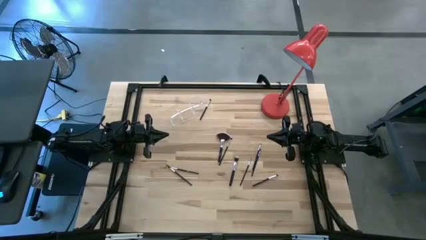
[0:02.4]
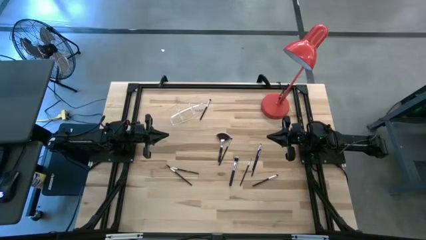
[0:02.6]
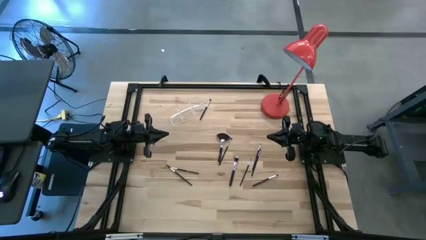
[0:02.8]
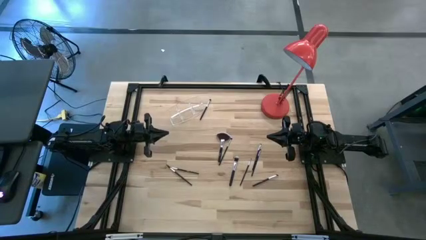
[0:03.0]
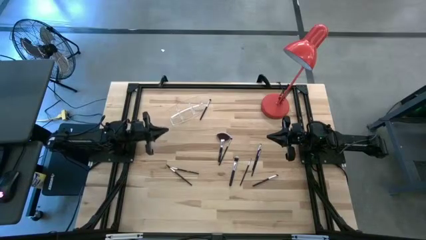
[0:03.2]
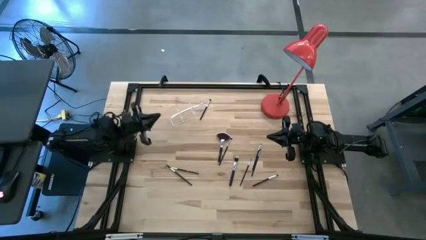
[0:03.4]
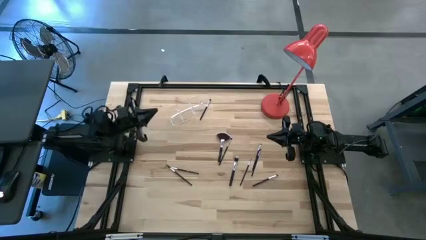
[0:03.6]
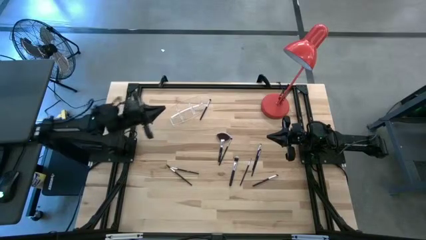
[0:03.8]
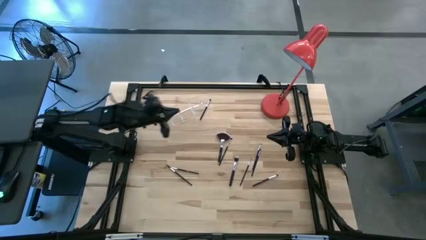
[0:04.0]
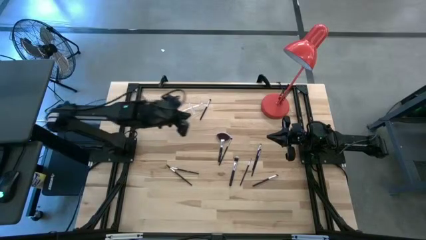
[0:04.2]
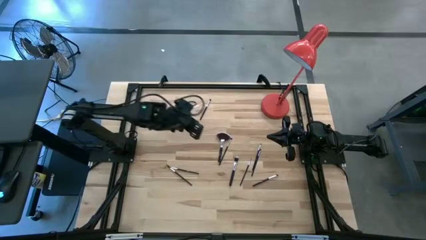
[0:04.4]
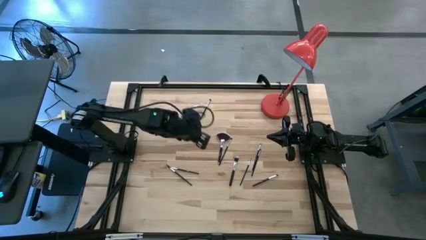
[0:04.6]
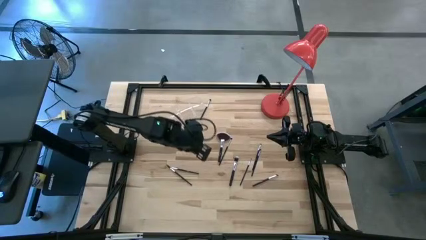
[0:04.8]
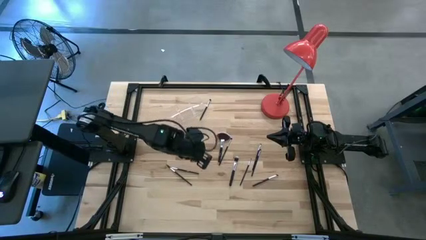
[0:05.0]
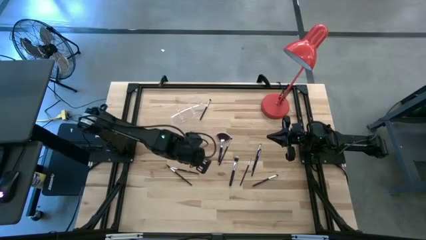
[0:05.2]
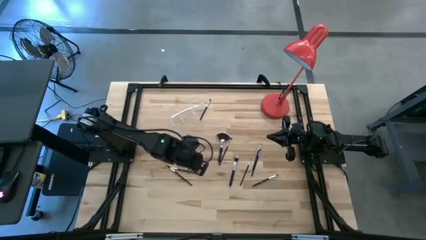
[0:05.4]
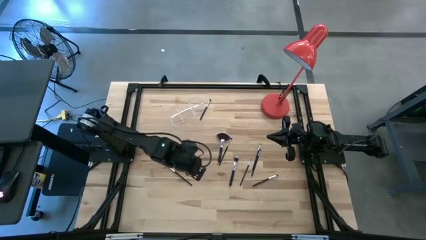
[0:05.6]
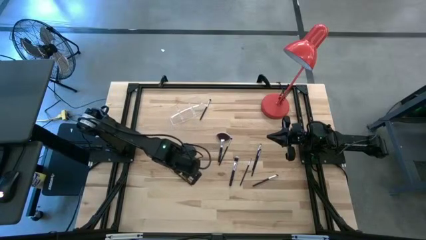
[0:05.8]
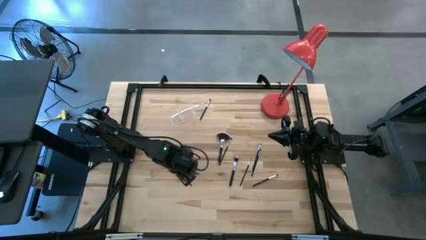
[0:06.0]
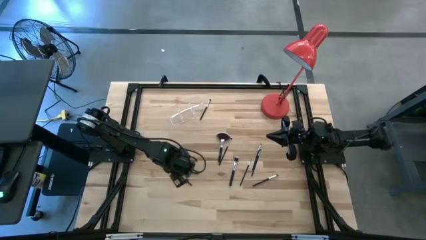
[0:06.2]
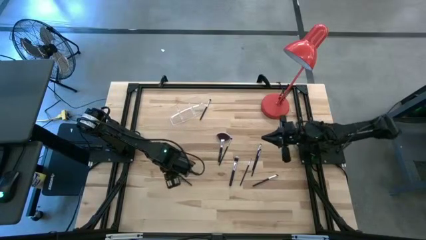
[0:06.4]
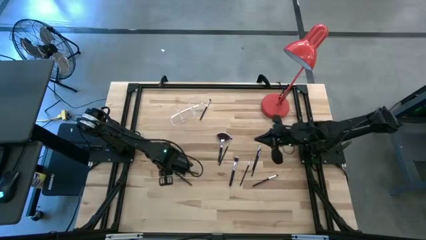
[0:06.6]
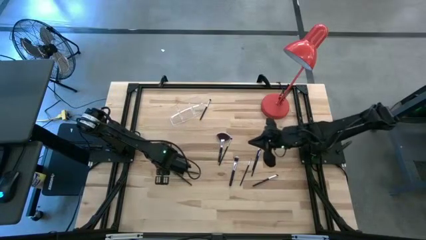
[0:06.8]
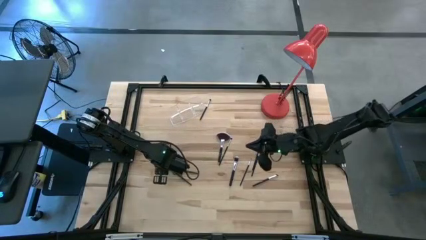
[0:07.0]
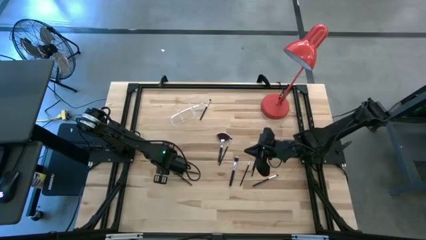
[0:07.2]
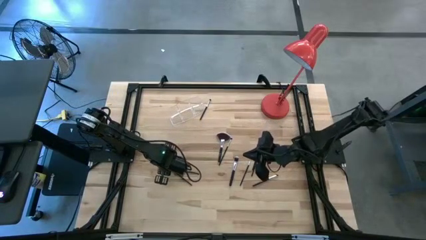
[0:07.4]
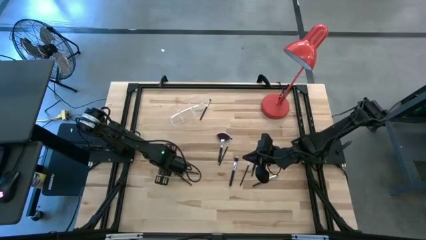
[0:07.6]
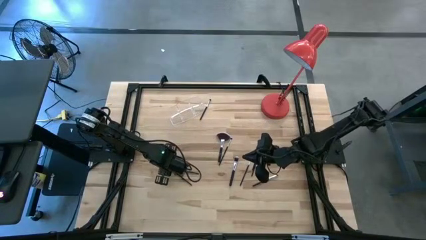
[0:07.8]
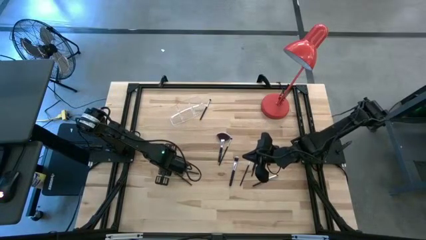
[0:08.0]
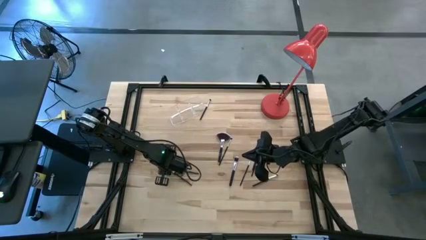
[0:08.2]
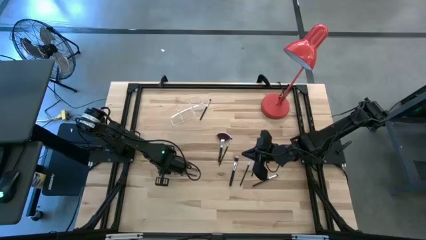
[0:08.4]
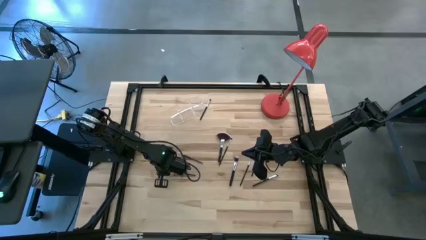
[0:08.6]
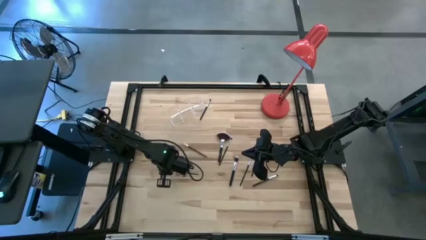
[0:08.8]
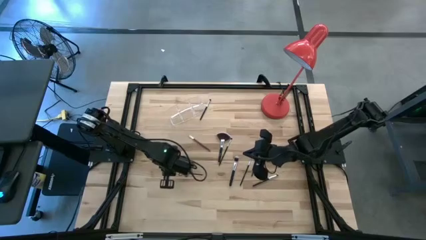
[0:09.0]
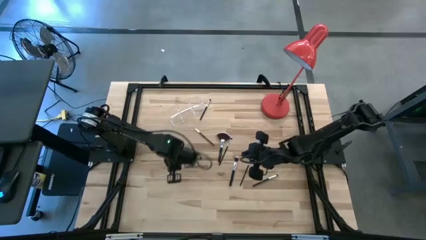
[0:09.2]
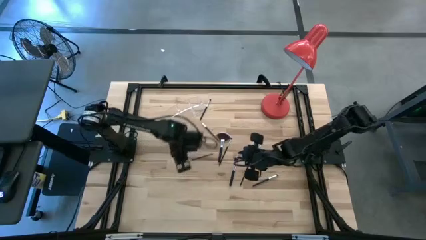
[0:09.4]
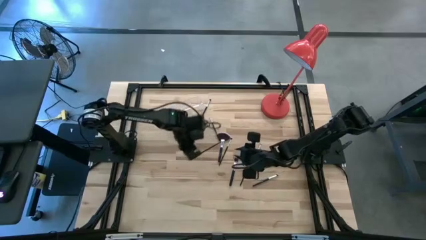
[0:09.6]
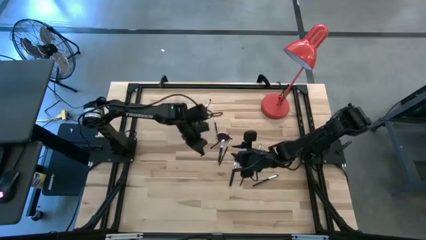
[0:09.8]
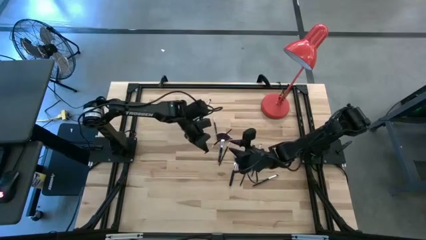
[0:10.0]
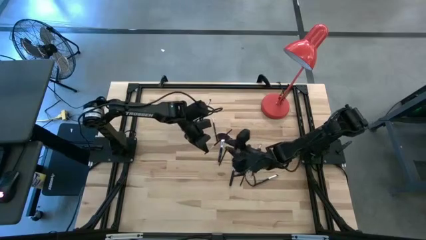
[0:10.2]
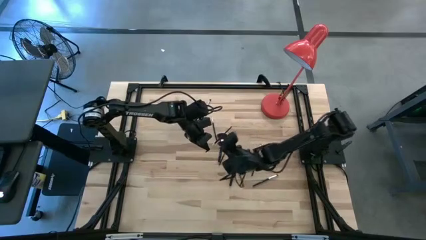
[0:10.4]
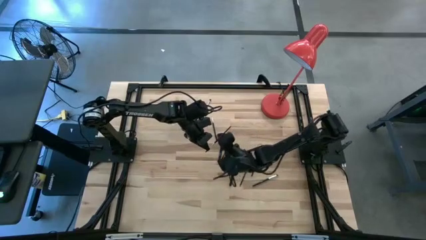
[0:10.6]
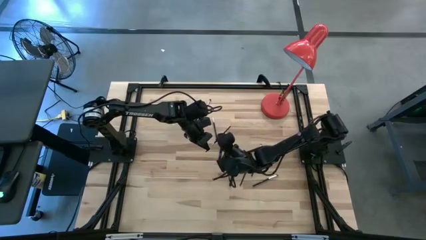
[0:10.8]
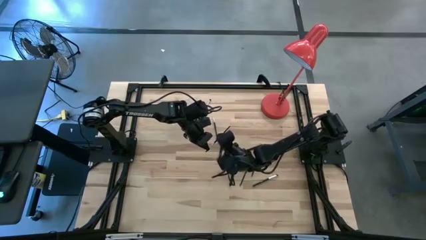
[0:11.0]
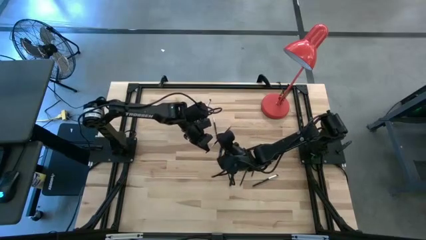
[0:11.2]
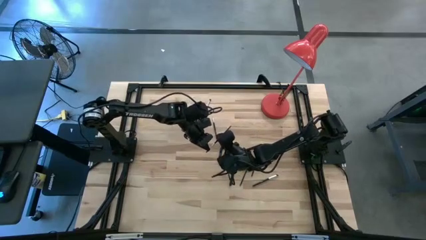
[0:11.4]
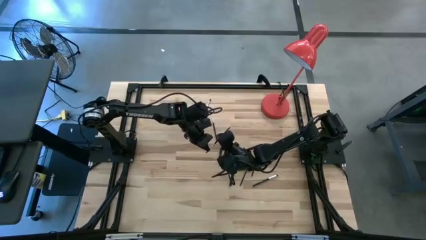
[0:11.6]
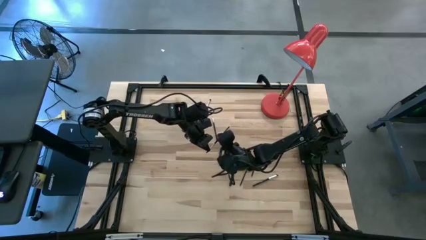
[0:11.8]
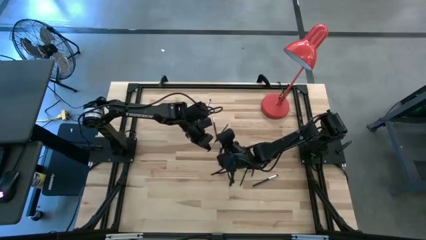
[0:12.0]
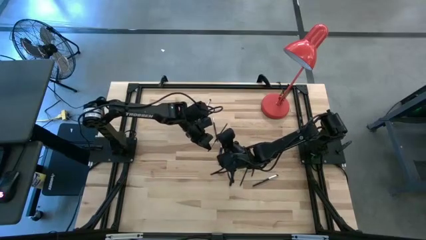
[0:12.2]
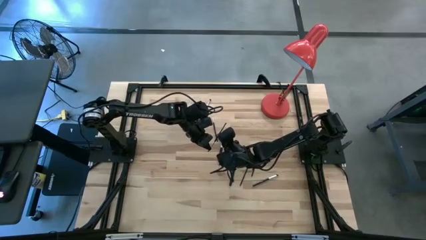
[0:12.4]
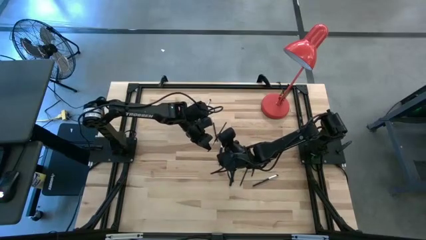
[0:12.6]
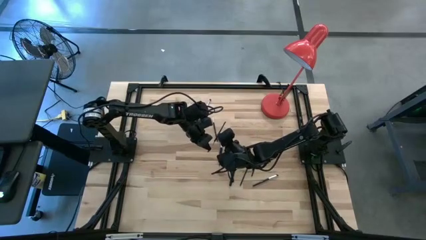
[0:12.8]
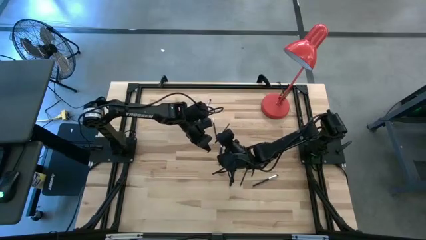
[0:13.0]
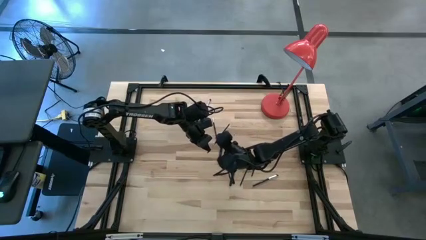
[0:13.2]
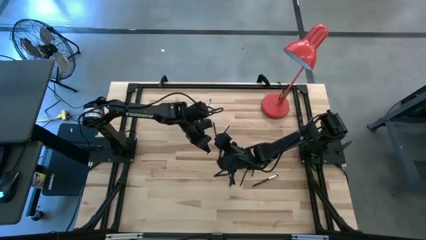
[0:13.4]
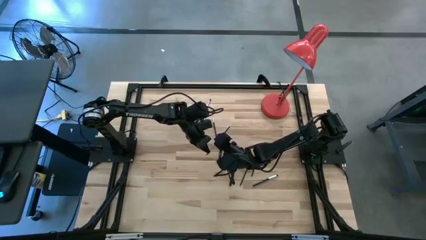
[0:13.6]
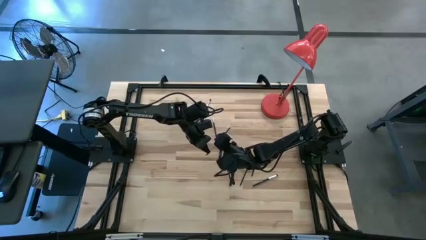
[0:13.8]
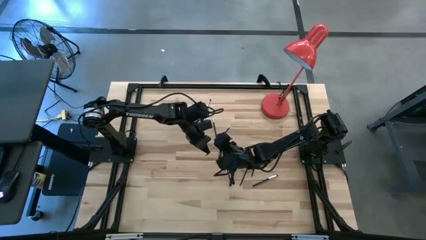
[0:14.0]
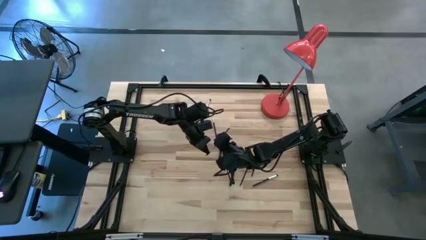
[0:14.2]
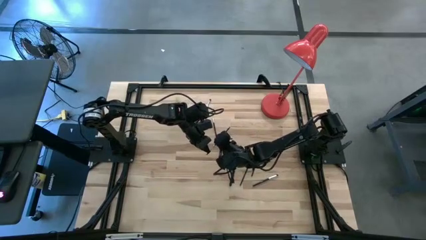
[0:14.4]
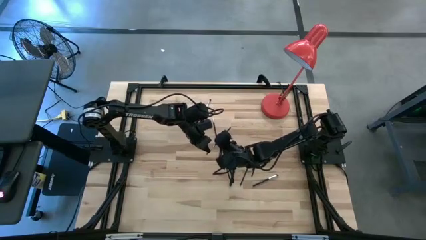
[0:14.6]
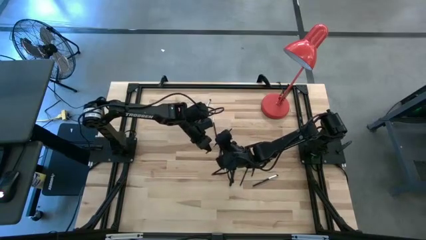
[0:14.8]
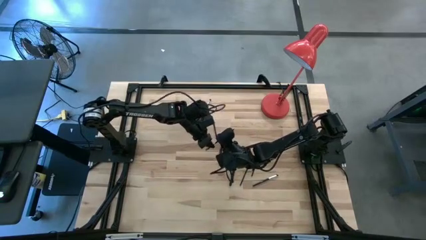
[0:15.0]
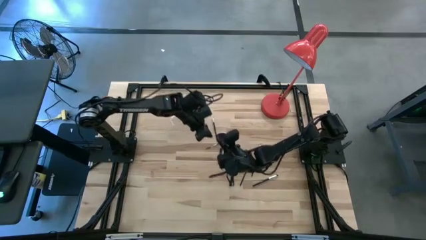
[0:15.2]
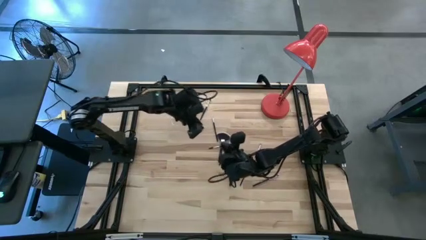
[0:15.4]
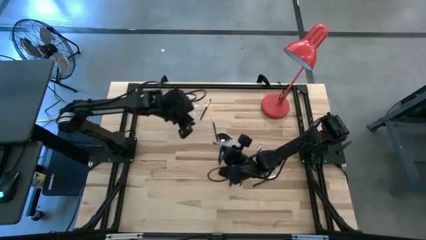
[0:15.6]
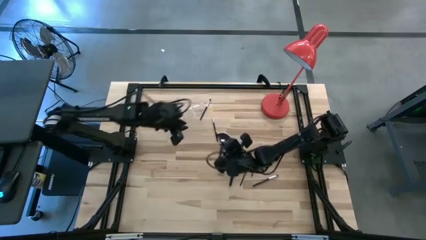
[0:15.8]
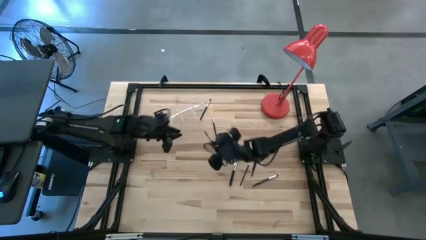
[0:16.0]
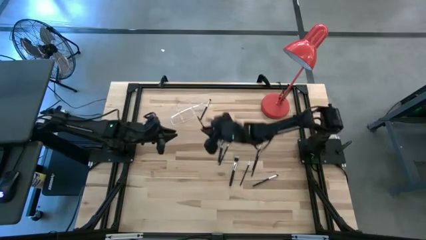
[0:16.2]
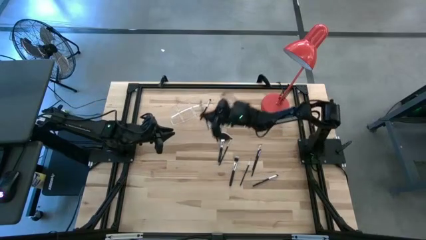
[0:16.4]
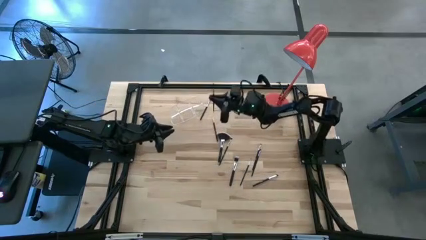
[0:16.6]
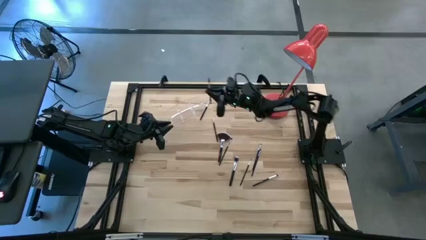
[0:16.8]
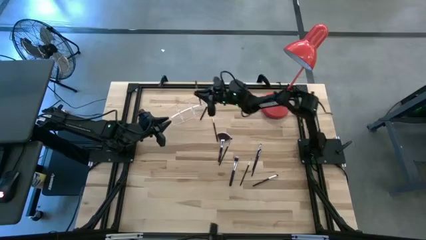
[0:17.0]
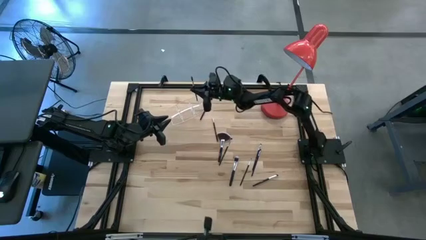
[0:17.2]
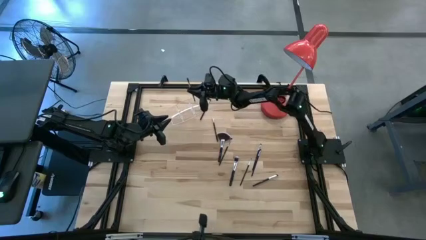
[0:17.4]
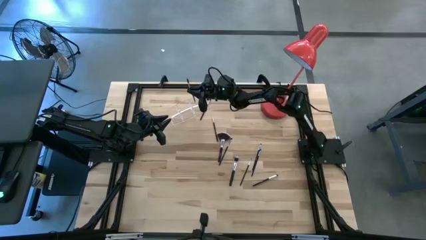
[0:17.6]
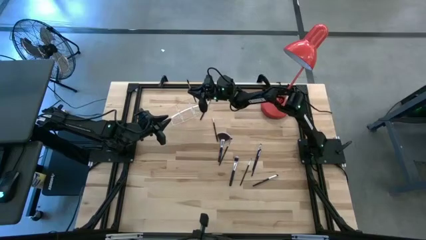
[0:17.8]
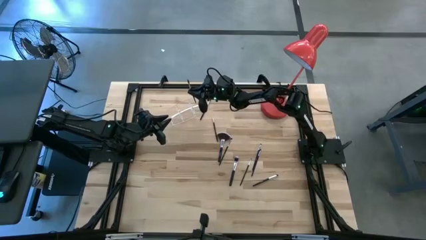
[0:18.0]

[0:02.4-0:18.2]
Task: Put items in baskets/containers
Put the brow brush into the transparent organizer
